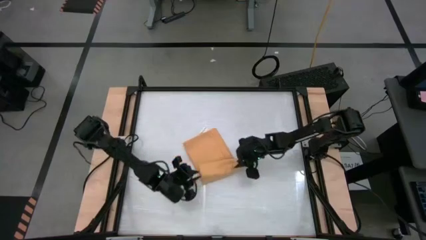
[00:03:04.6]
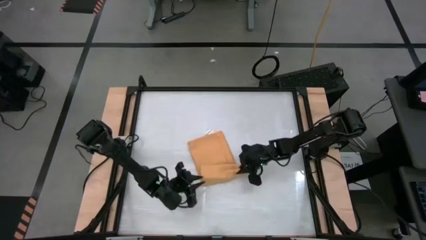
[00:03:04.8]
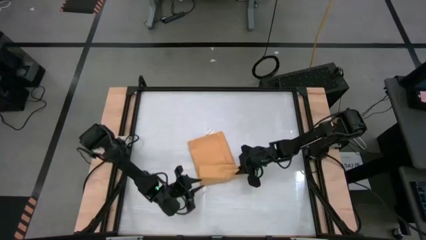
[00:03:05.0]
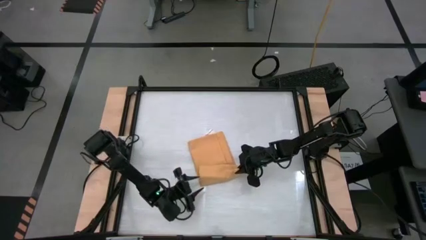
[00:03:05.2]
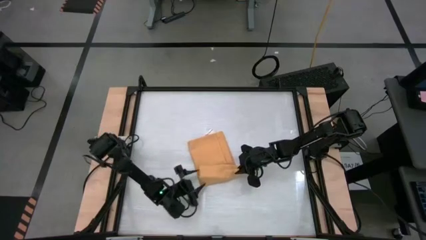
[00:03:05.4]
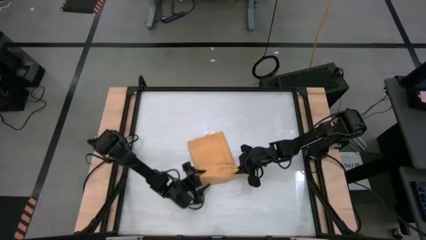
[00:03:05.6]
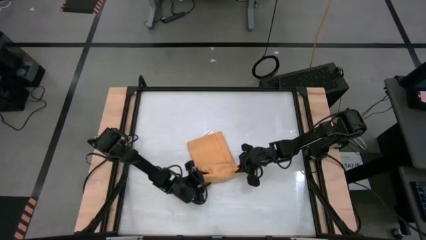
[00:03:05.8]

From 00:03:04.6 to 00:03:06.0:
Task: Roll towel
Roll the yellow towel

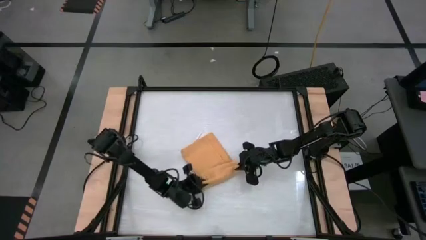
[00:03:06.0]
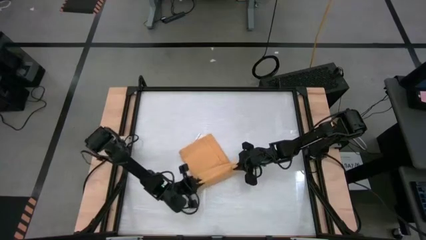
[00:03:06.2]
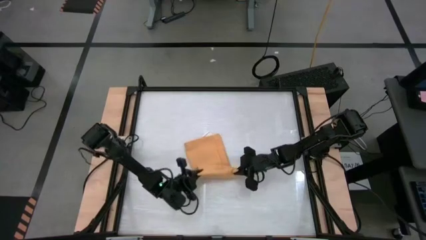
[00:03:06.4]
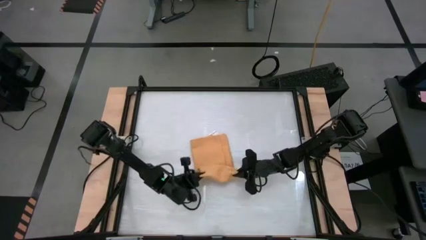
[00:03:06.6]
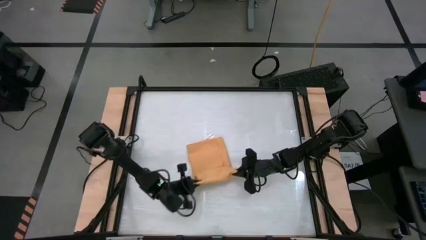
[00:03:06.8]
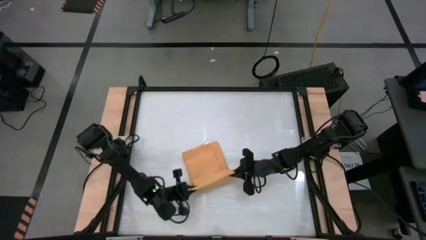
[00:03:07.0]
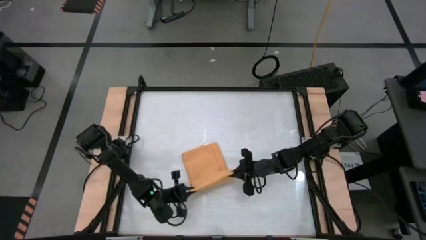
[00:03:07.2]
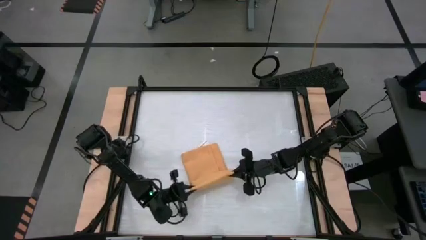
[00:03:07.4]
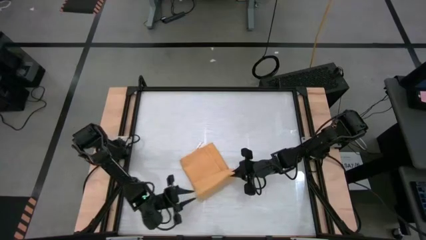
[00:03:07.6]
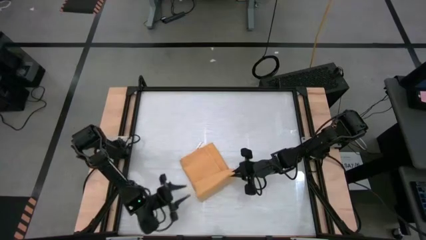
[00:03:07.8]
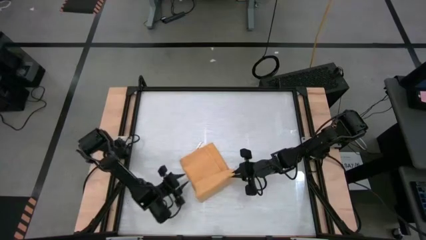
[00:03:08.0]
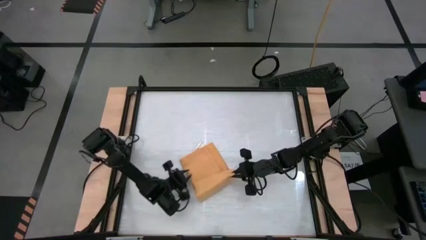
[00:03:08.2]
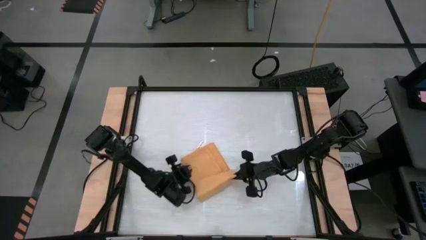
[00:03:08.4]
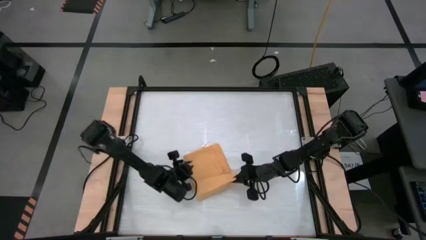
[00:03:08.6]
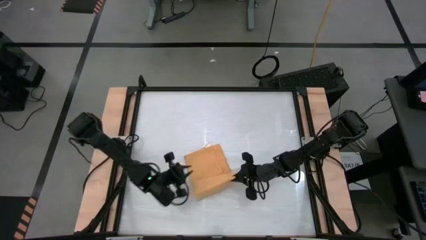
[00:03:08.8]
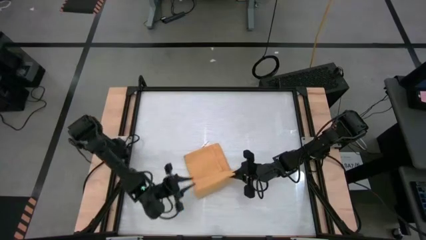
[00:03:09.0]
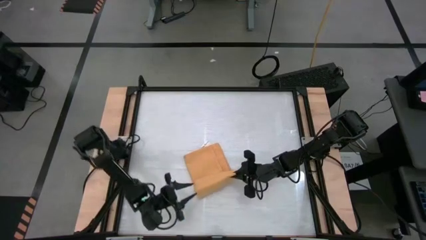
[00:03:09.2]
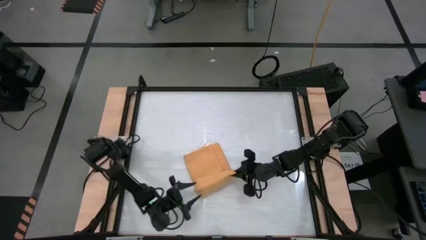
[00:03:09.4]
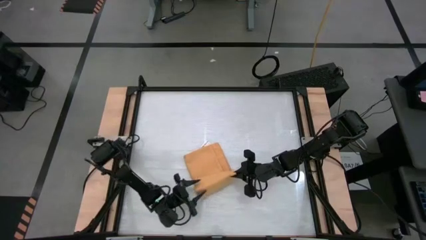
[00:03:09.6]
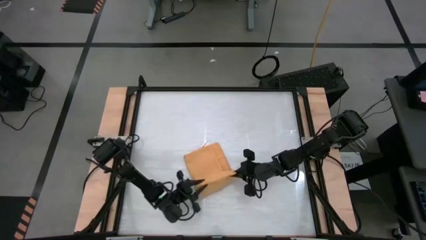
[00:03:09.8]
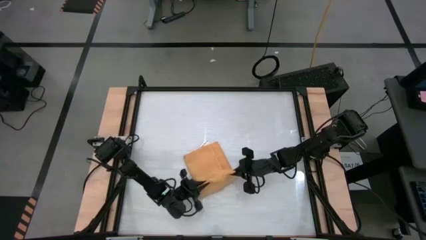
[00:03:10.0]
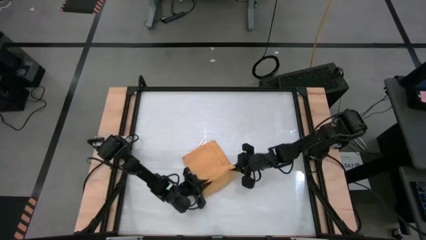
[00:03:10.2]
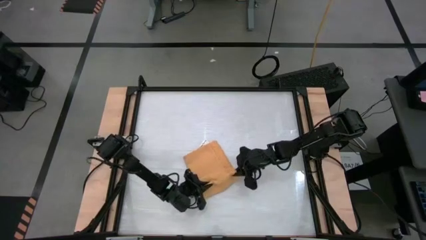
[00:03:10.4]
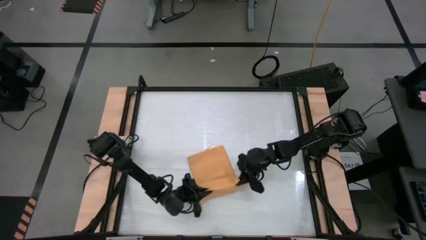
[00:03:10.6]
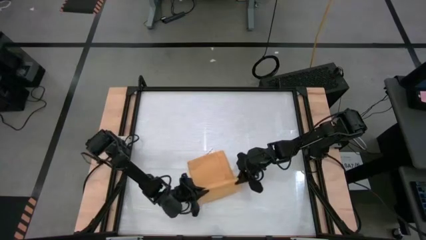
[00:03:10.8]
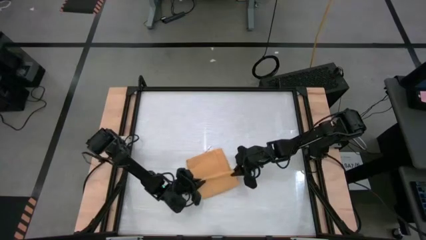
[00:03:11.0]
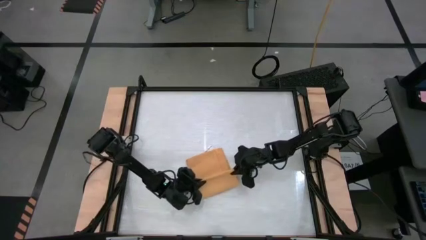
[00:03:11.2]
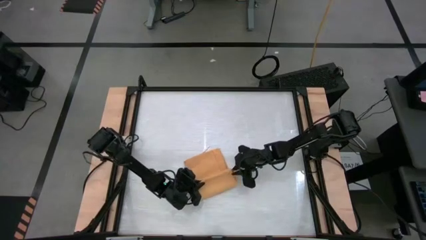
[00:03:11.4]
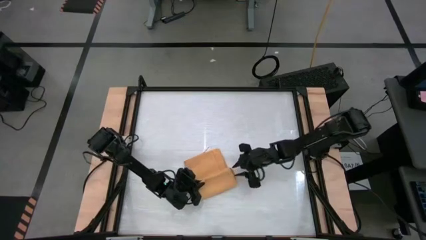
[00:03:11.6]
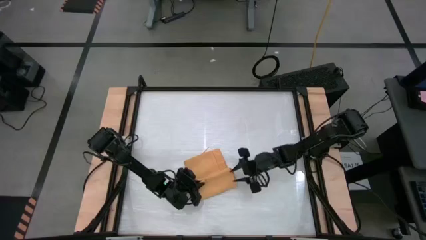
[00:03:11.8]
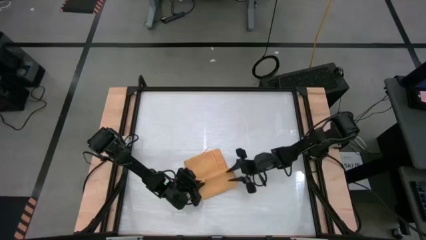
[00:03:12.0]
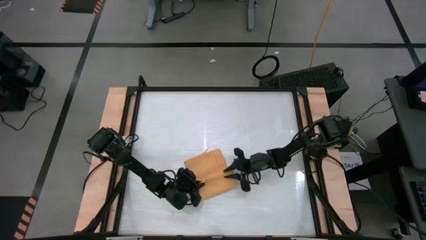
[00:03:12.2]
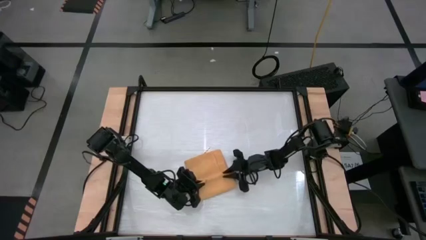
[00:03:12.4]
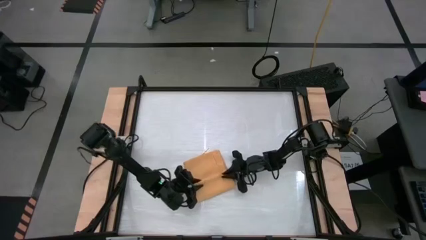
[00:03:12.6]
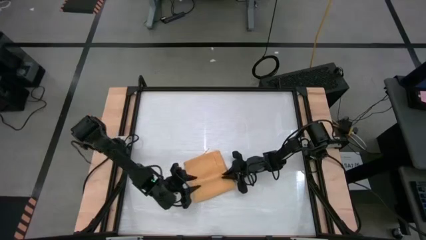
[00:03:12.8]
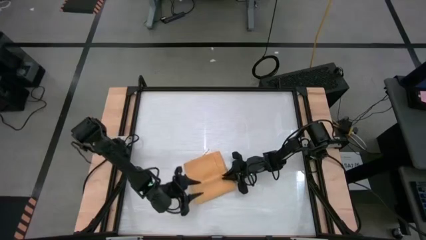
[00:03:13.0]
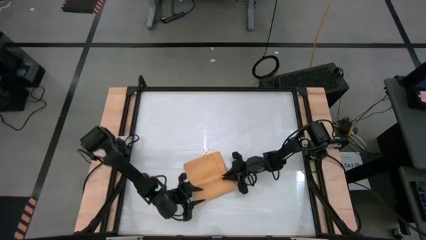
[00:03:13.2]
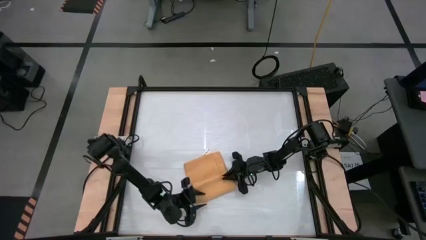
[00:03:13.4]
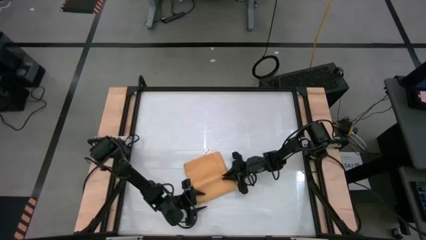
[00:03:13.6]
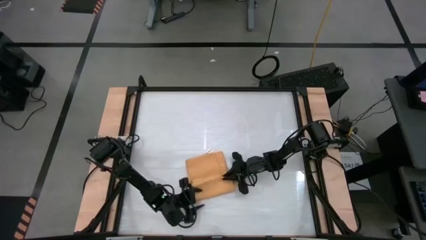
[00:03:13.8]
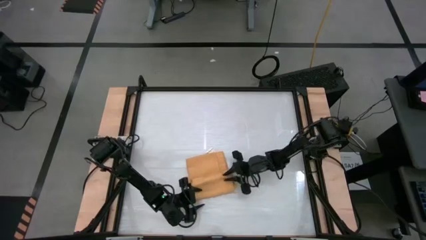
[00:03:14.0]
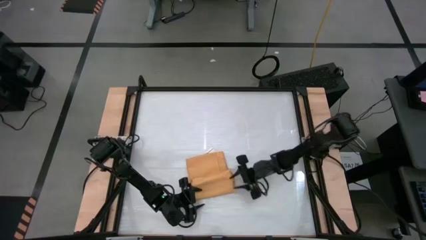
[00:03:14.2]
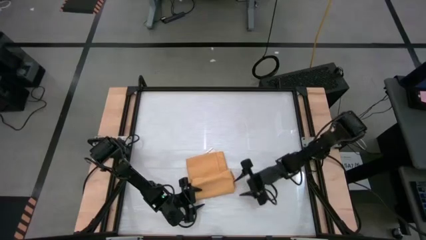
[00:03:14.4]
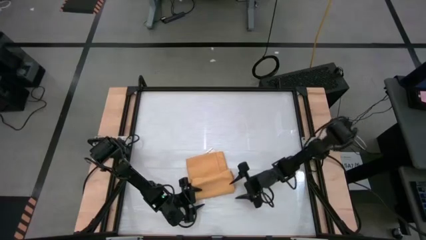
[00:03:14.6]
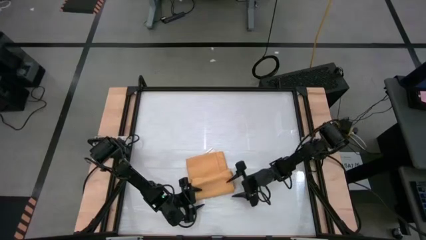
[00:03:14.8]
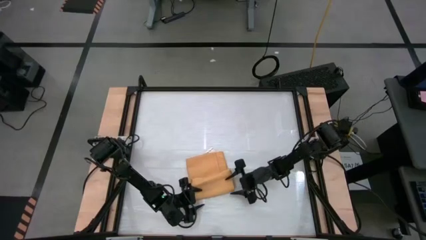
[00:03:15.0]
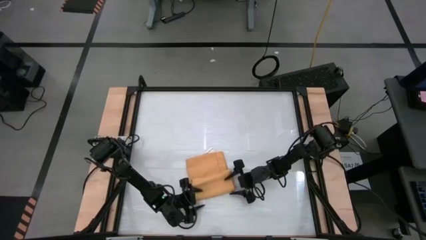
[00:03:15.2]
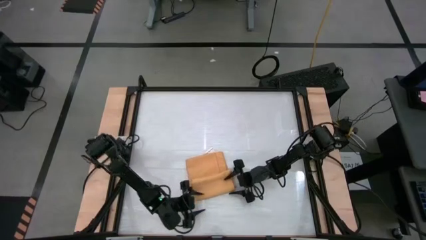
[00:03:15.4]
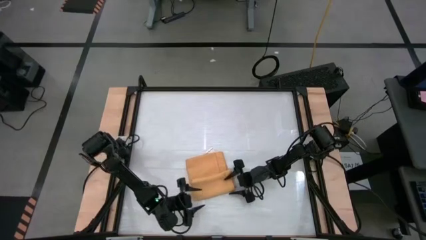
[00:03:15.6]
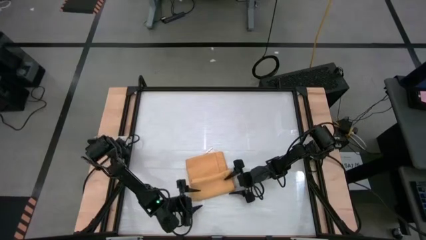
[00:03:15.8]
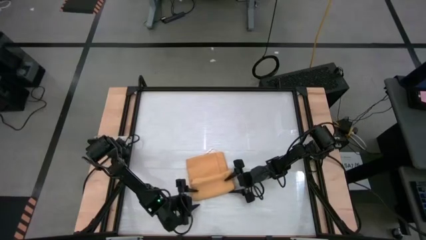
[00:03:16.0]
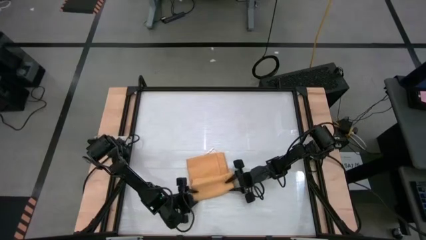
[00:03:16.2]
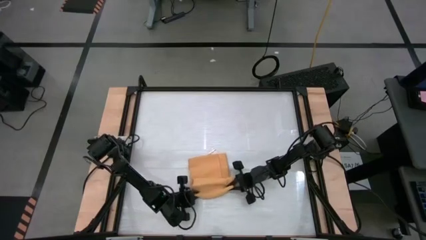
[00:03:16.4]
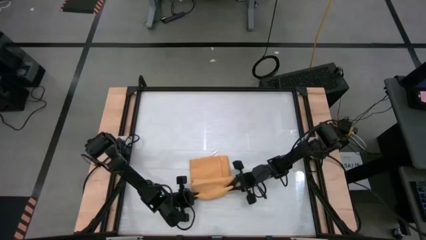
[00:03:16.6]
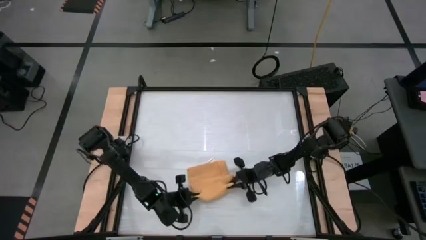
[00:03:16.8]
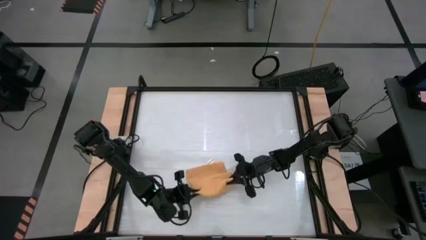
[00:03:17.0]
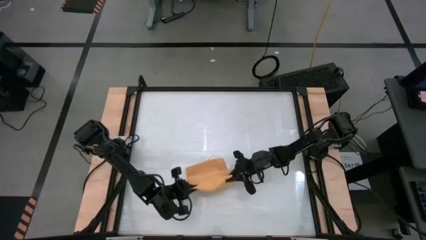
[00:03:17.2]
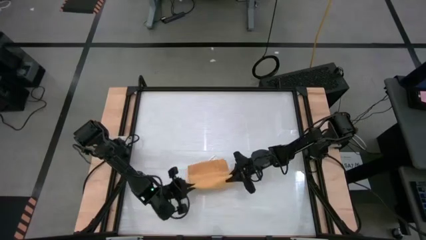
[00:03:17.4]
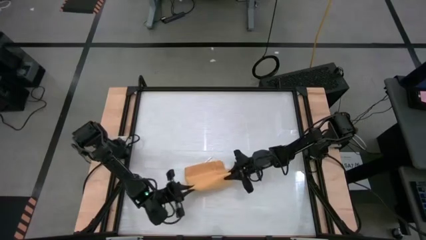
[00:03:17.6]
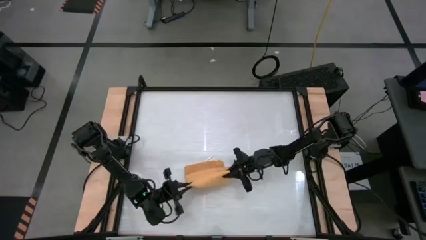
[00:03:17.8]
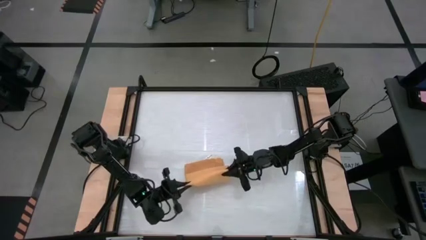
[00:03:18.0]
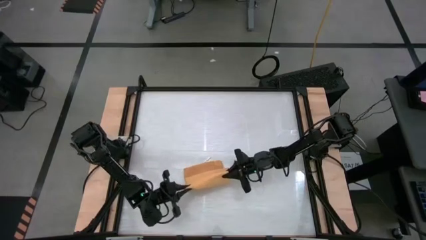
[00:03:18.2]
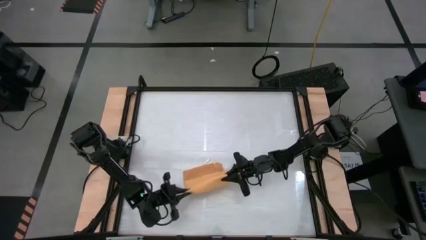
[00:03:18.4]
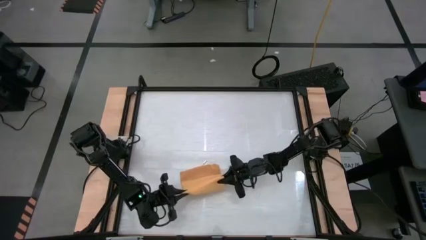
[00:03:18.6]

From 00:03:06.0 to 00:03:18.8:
Roll the yellow towel
